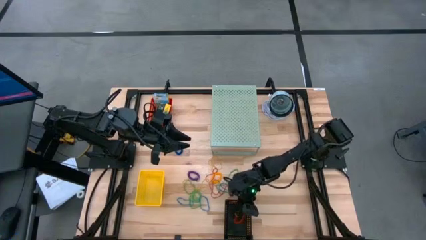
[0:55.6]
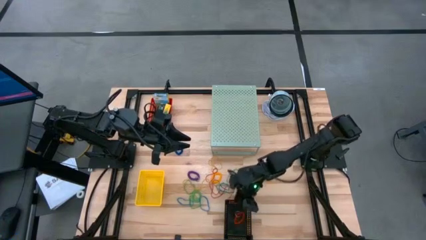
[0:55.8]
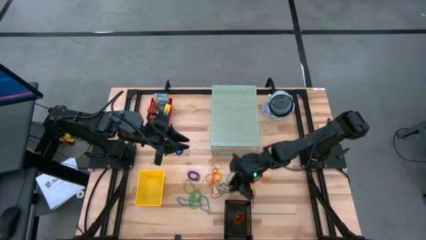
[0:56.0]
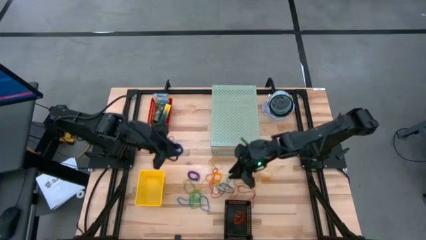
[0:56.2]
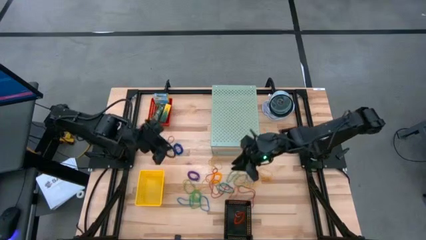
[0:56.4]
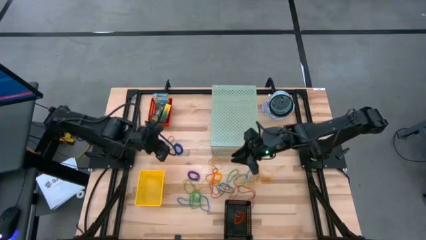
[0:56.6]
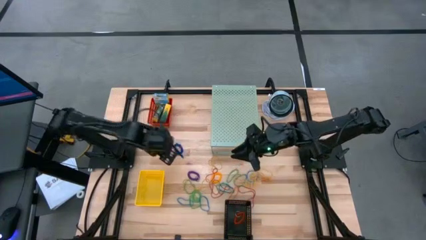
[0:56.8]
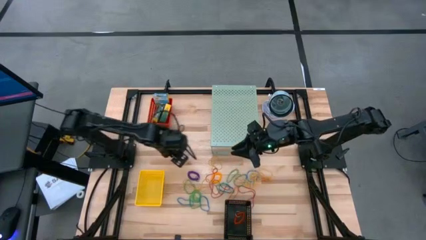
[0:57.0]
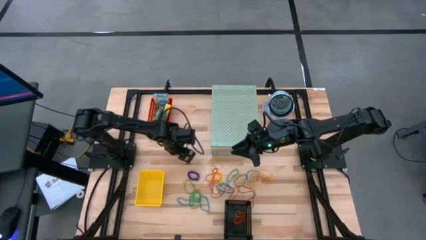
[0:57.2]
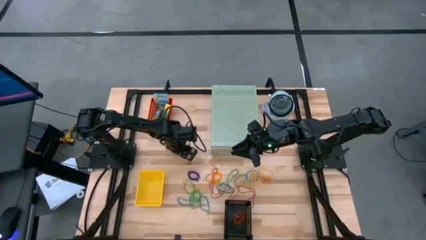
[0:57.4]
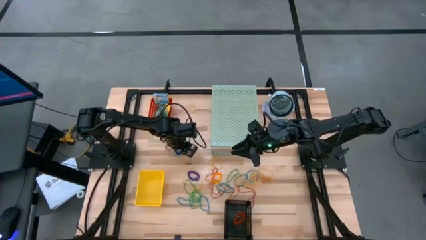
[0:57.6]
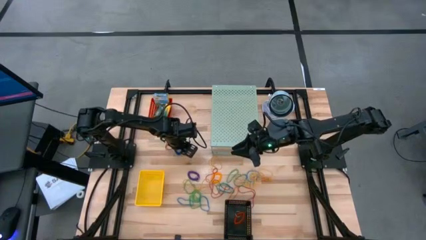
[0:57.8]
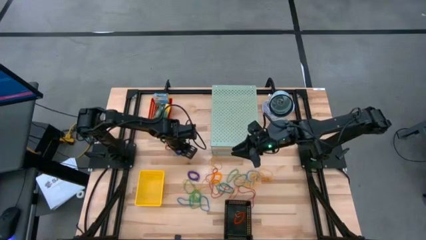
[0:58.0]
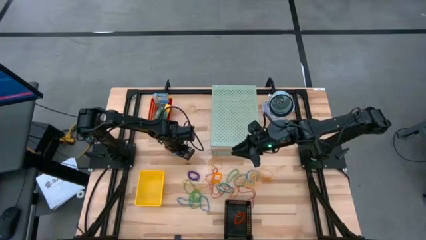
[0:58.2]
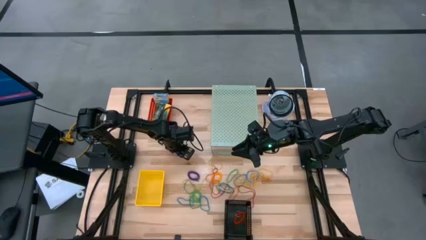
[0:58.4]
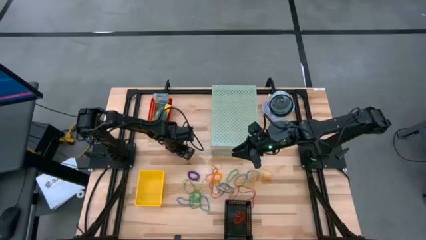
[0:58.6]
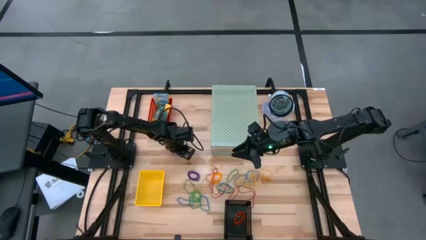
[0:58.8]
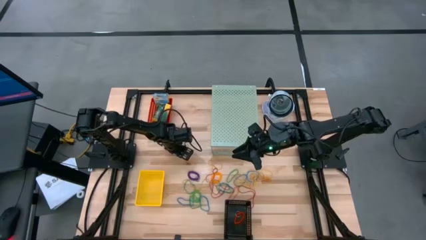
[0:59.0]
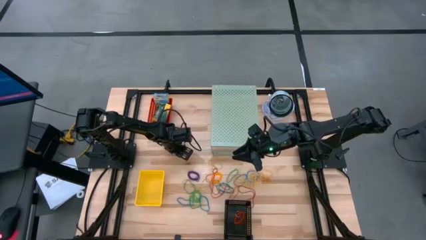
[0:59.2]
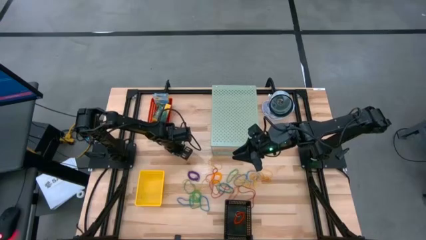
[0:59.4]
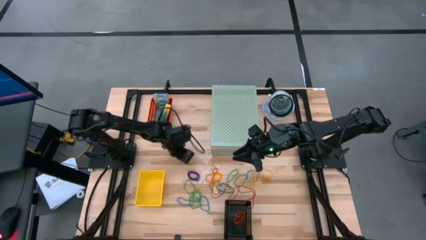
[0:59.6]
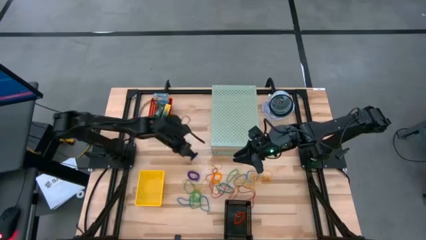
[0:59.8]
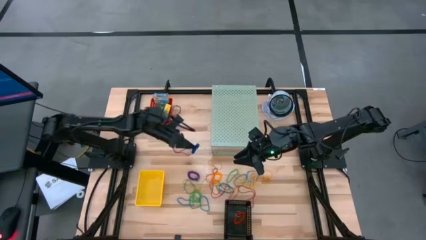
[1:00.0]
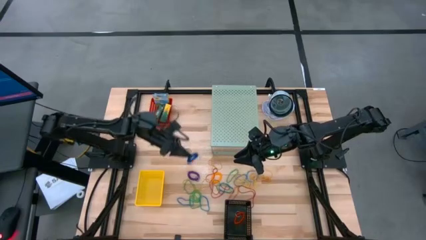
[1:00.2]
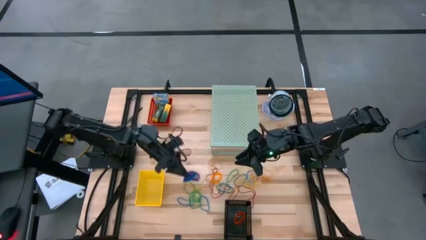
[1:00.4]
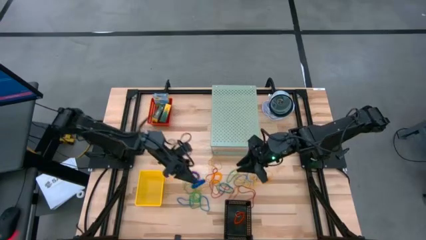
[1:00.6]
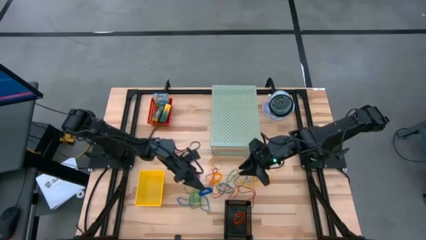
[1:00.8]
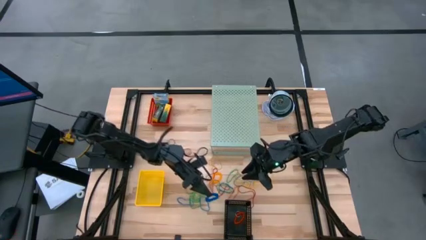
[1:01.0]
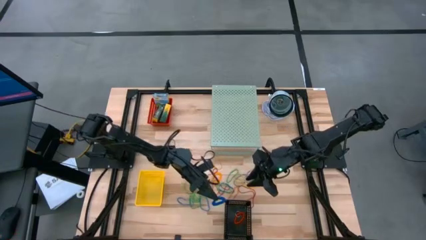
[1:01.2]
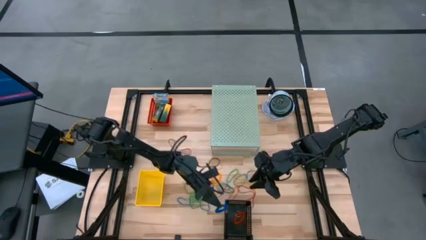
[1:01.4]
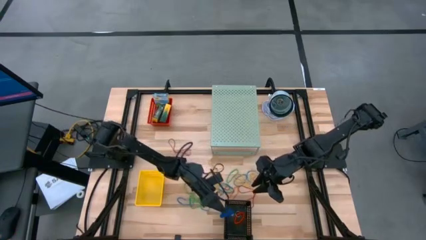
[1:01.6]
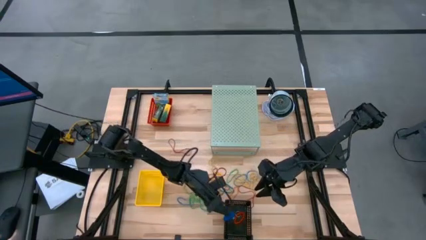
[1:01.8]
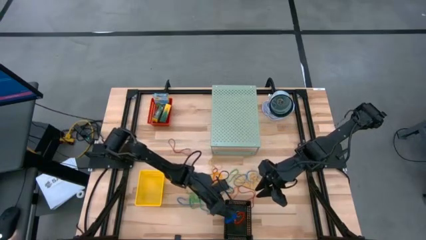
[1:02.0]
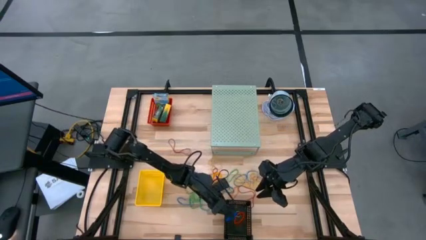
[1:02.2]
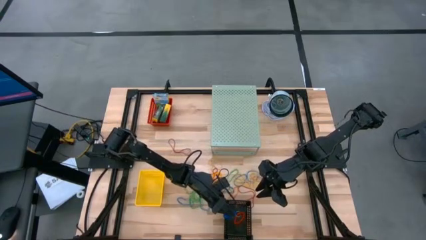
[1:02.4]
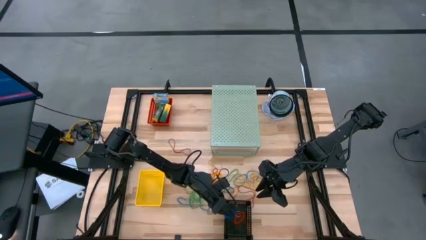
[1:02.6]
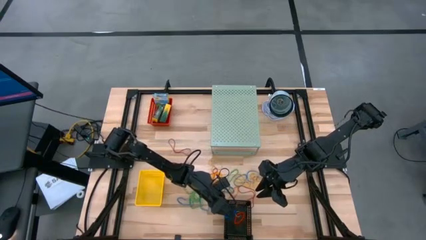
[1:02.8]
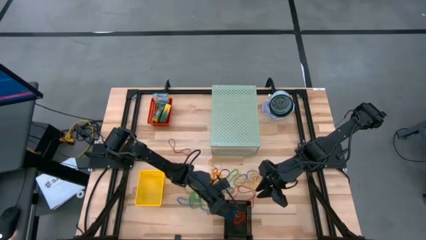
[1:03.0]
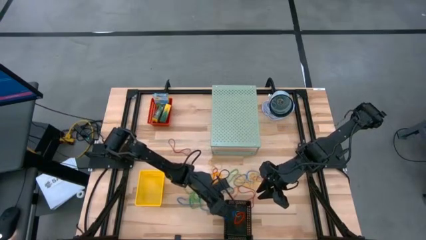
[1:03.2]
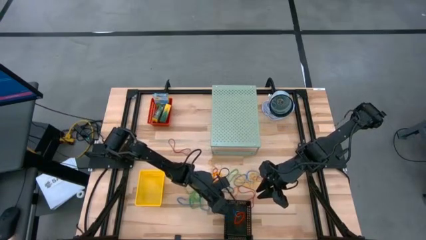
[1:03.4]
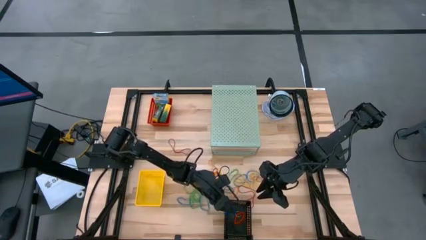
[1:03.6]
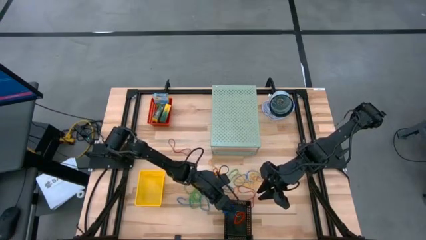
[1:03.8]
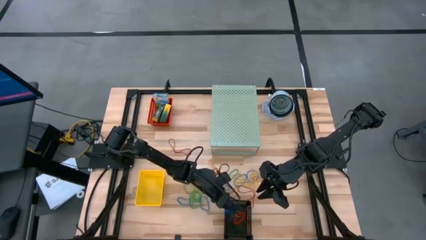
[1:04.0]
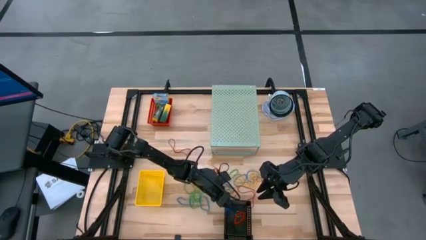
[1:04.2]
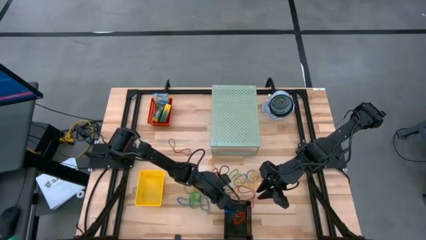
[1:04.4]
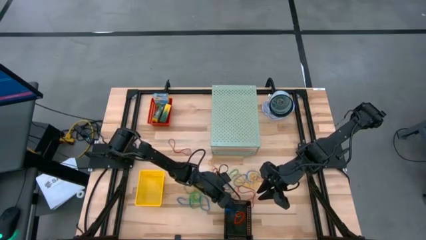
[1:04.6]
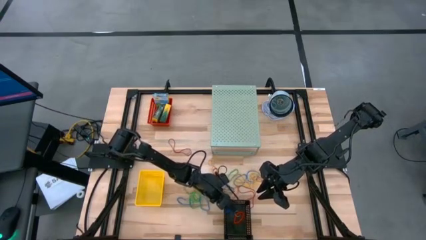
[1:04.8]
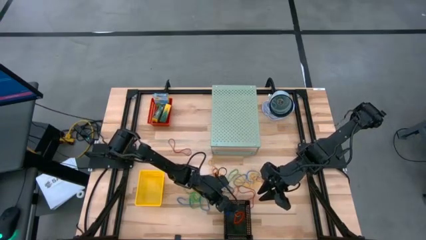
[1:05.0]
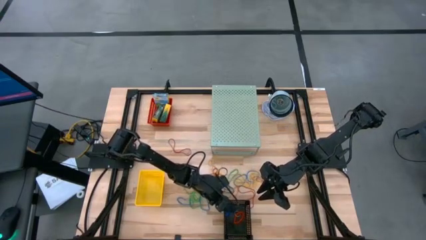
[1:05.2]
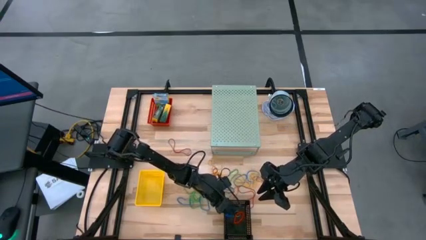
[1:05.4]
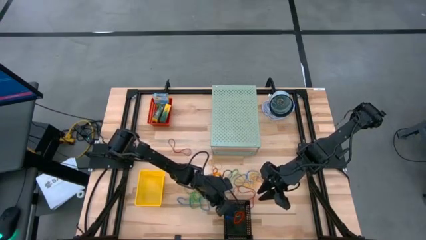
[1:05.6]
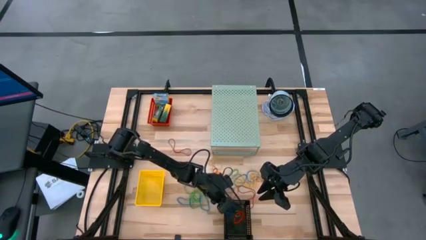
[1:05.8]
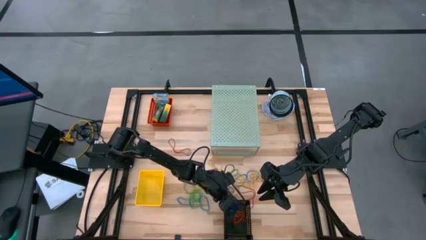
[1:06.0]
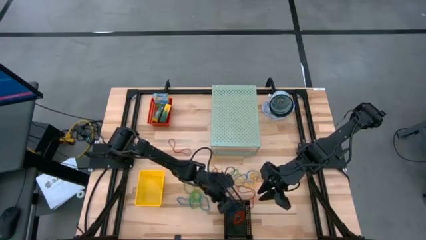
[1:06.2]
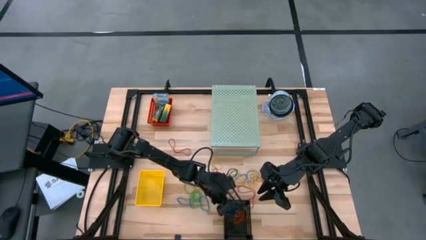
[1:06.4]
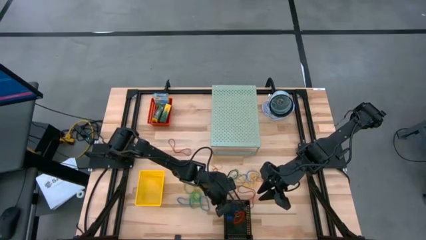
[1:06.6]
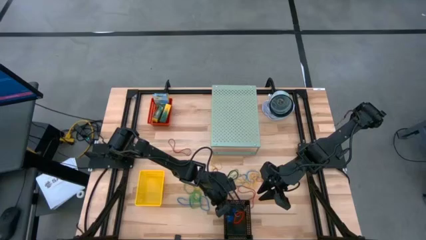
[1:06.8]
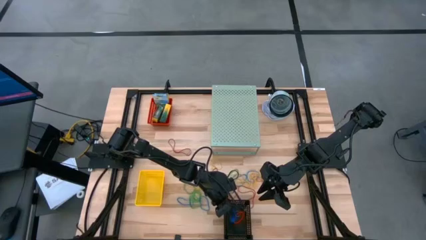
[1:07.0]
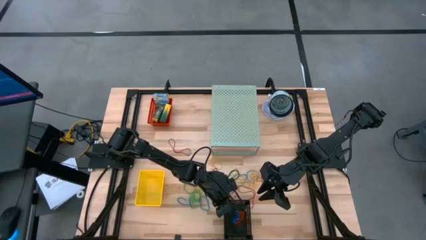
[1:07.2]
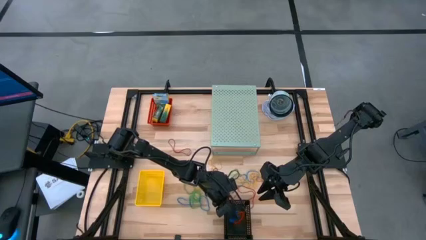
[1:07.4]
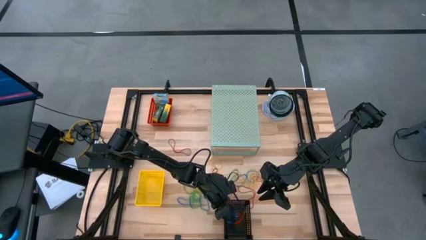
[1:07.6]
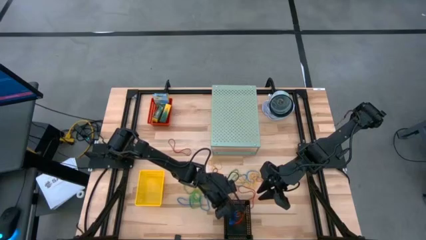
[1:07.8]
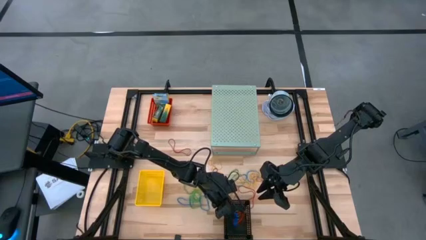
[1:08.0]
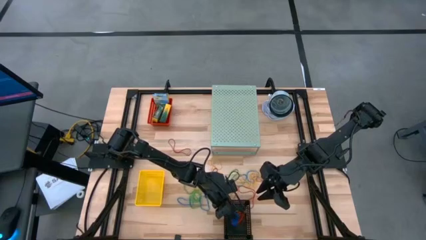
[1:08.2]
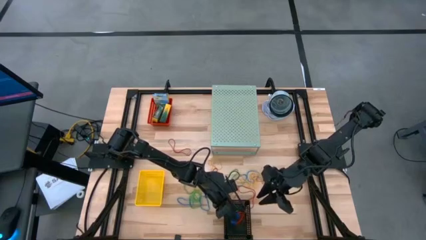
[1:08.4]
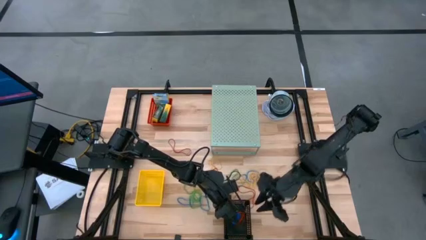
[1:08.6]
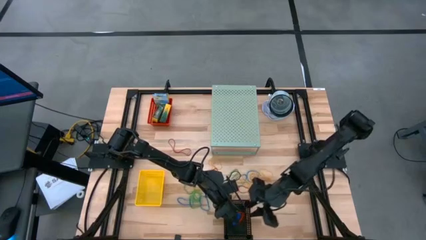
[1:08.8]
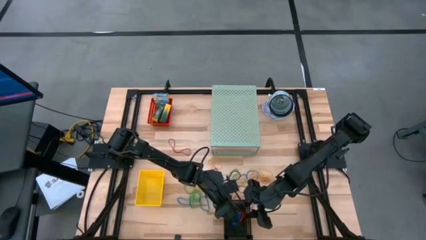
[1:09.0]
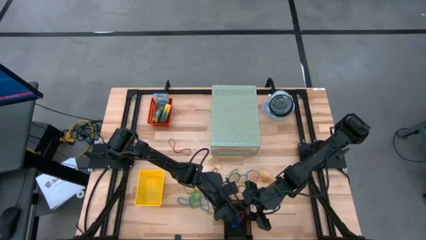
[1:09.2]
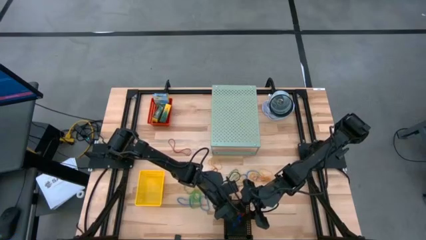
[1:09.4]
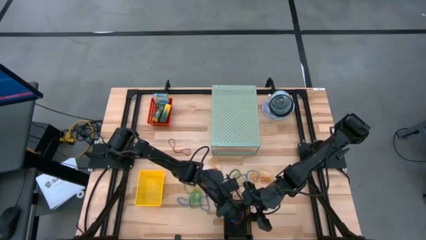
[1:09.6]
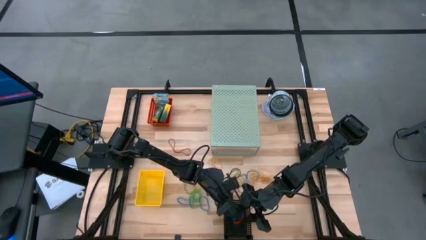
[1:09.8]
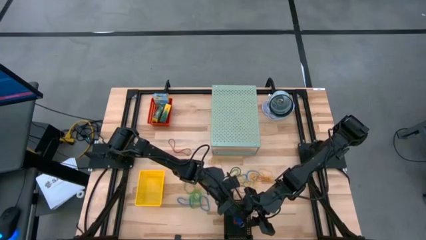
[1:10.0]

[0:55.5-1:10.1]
Task: Pick & Place Office Desk Supplies
Put the blue spring keychain into the black bin
